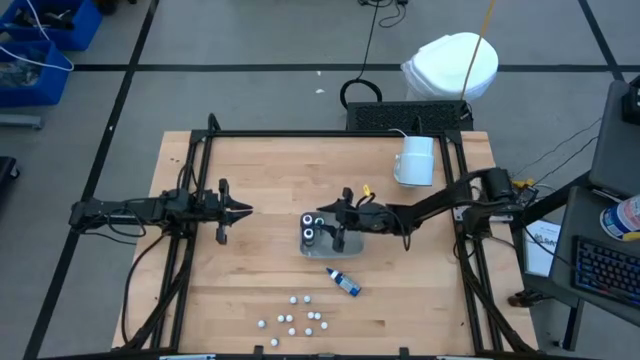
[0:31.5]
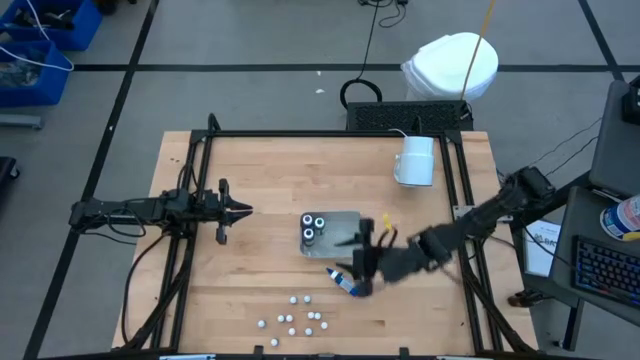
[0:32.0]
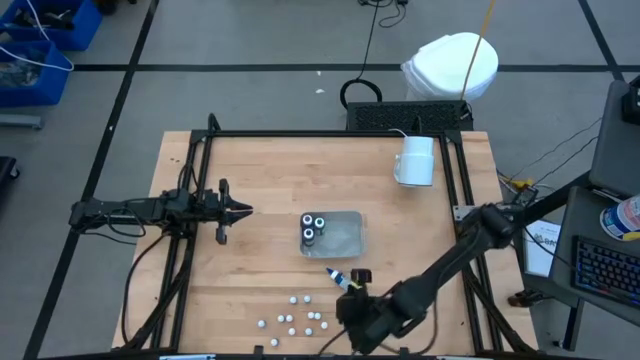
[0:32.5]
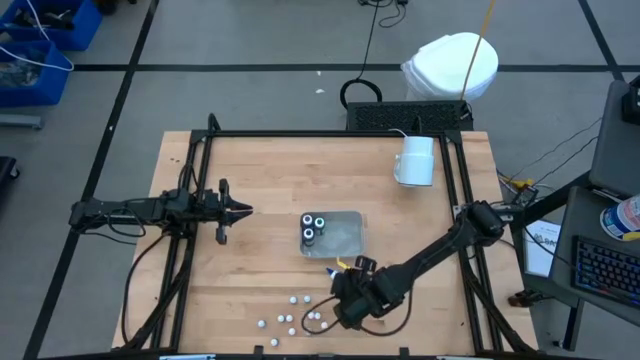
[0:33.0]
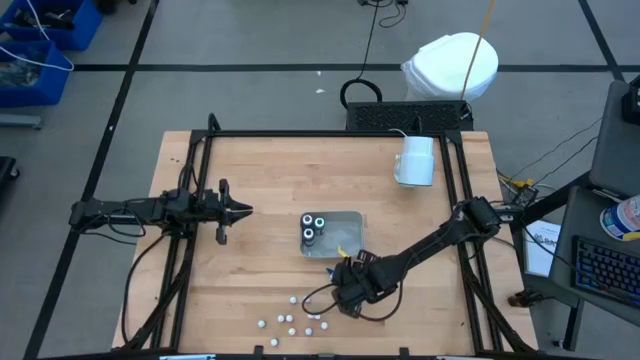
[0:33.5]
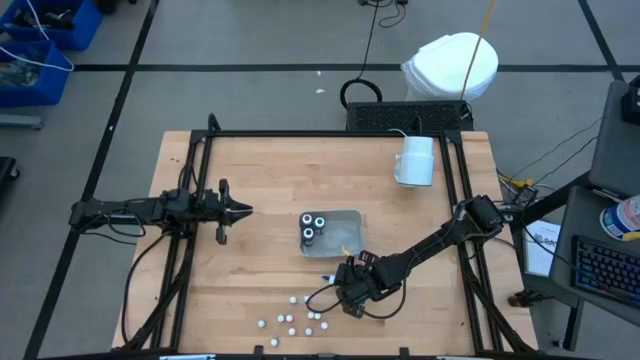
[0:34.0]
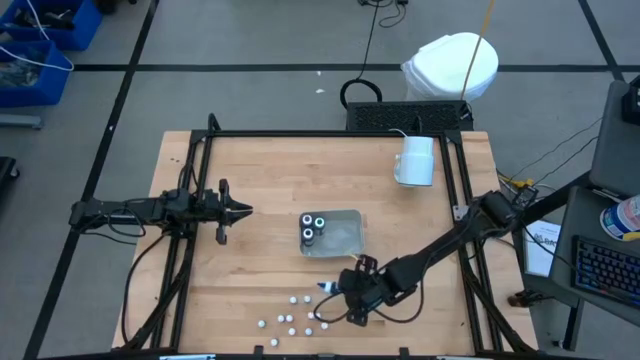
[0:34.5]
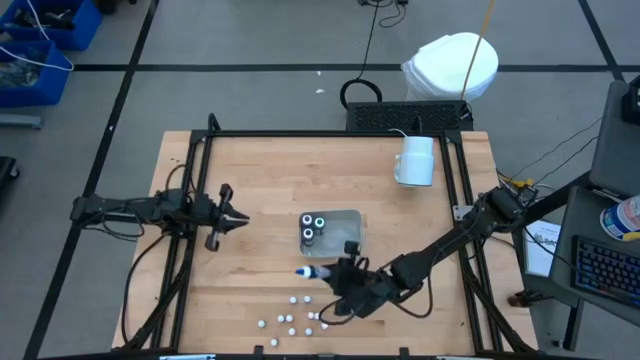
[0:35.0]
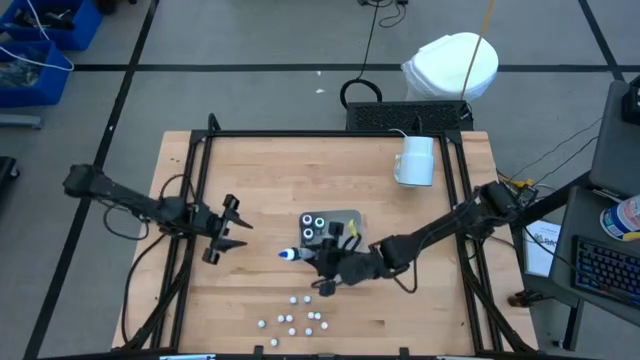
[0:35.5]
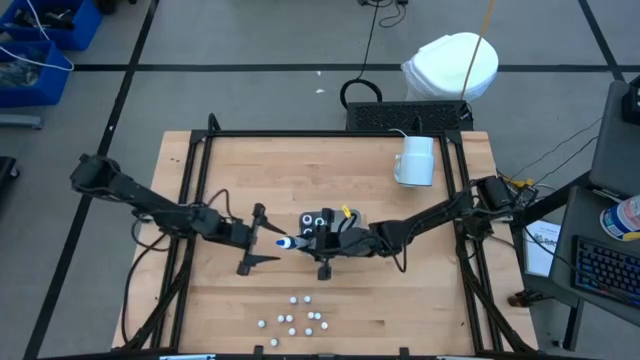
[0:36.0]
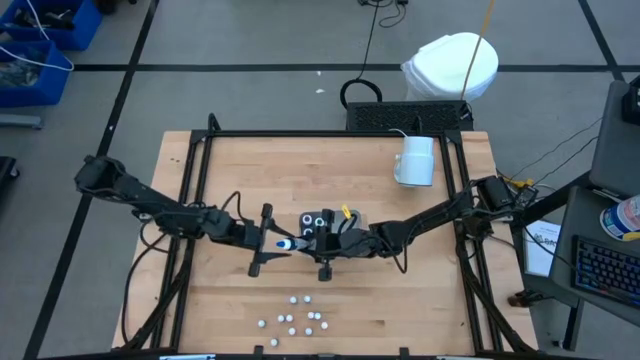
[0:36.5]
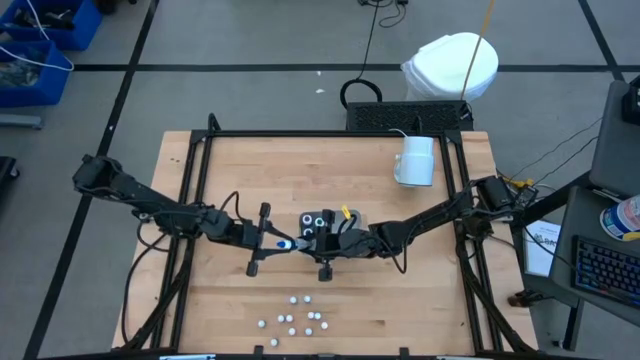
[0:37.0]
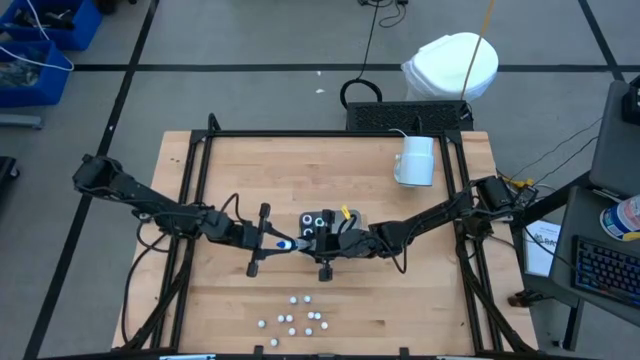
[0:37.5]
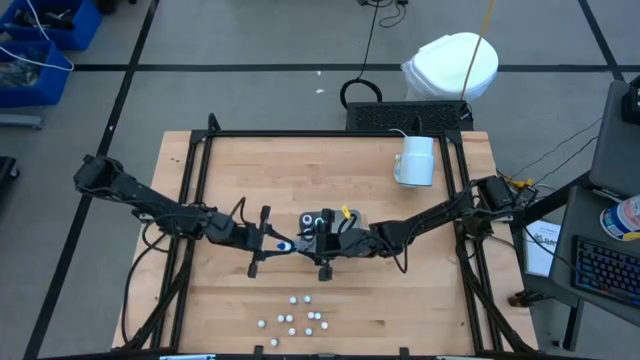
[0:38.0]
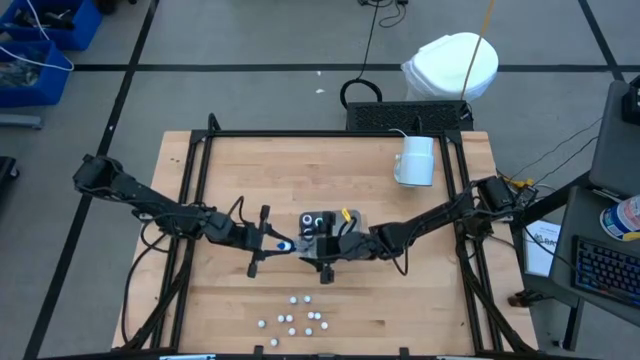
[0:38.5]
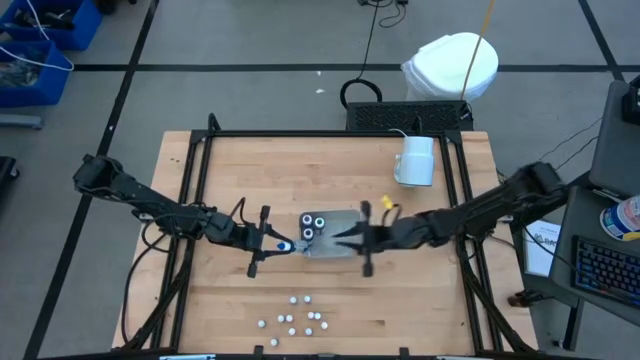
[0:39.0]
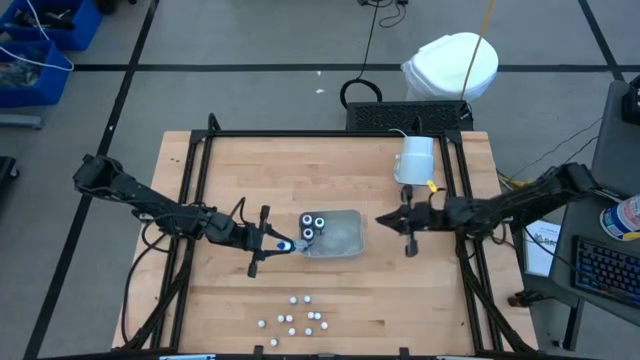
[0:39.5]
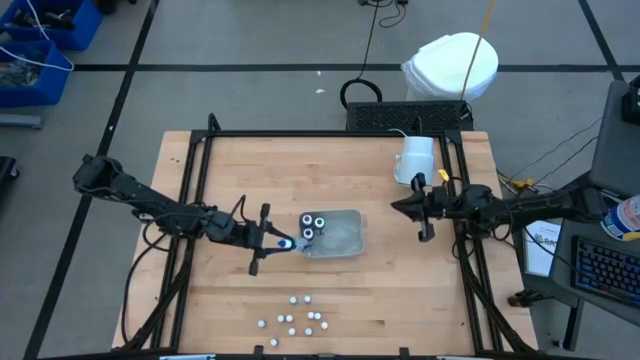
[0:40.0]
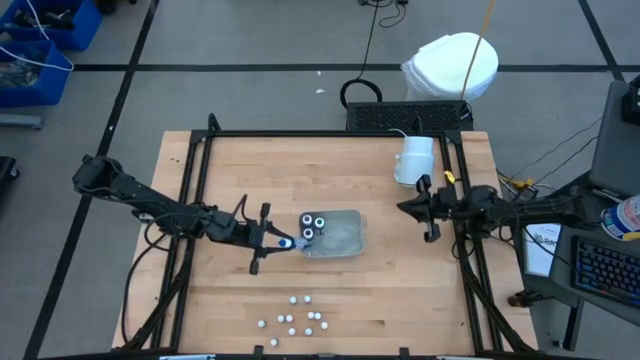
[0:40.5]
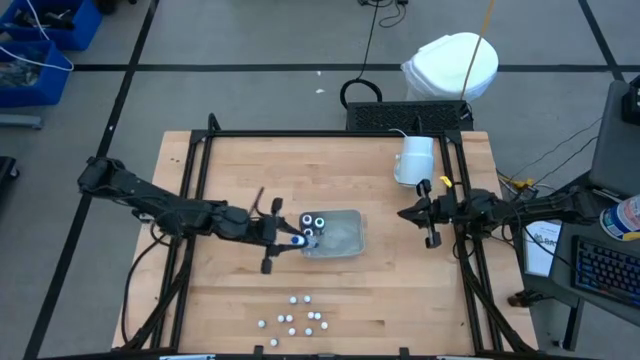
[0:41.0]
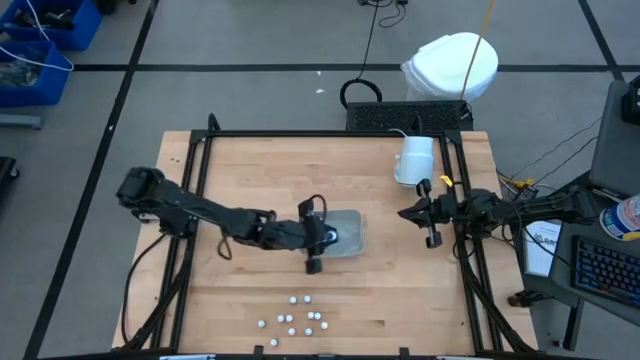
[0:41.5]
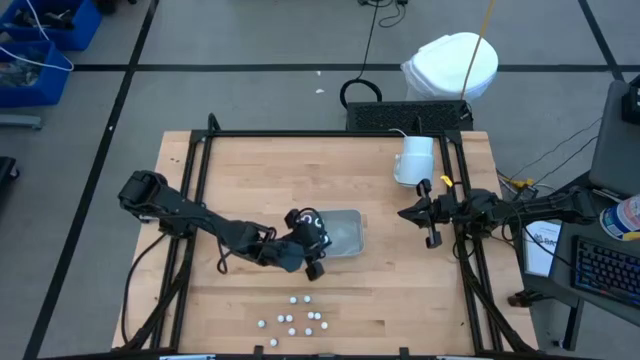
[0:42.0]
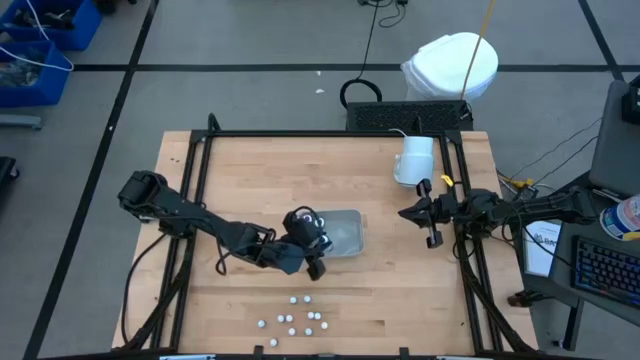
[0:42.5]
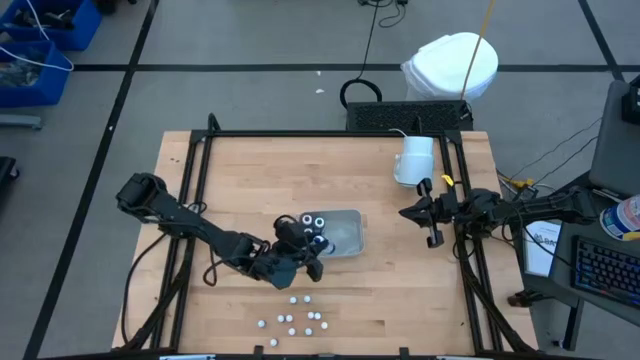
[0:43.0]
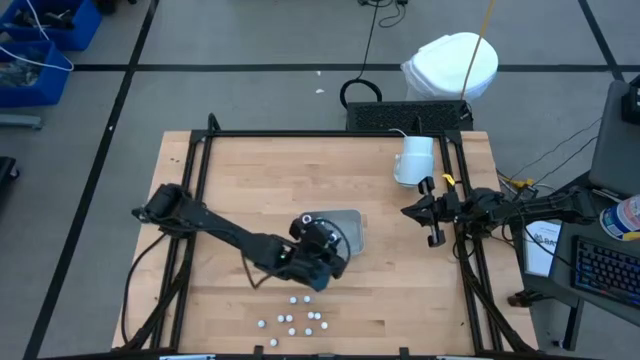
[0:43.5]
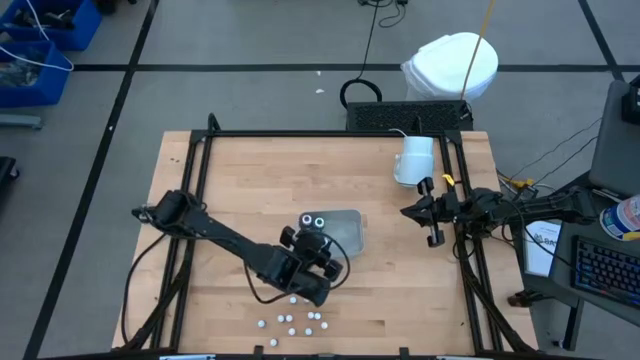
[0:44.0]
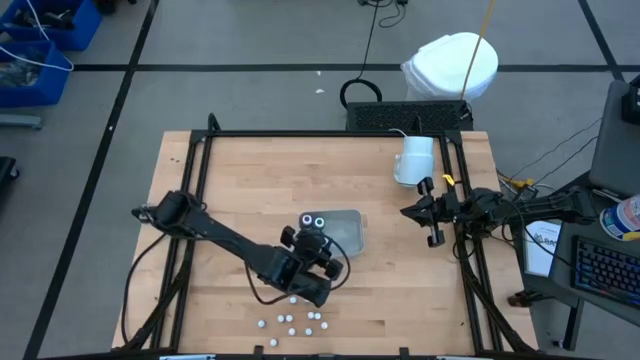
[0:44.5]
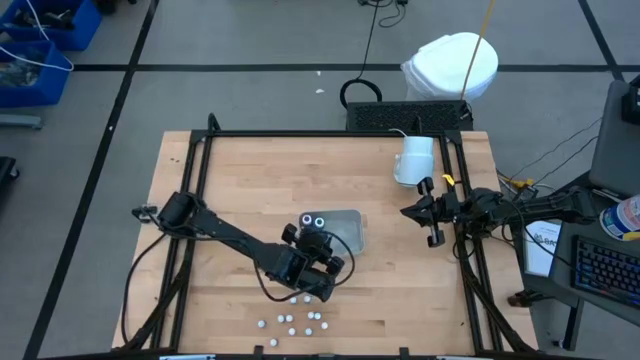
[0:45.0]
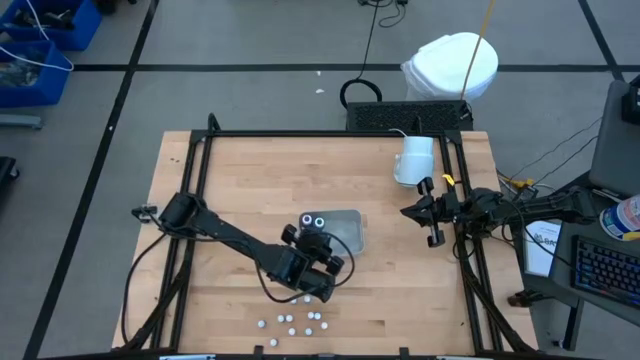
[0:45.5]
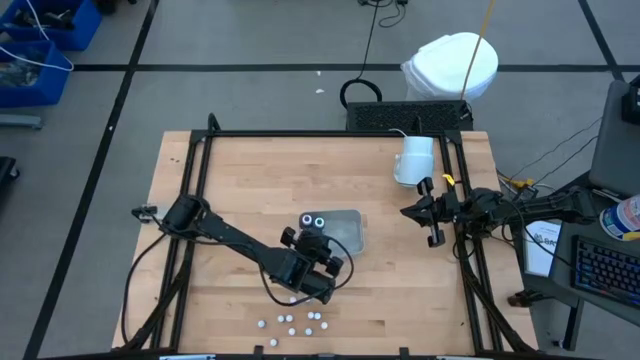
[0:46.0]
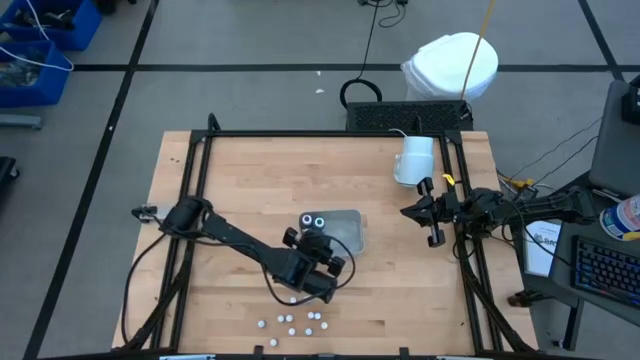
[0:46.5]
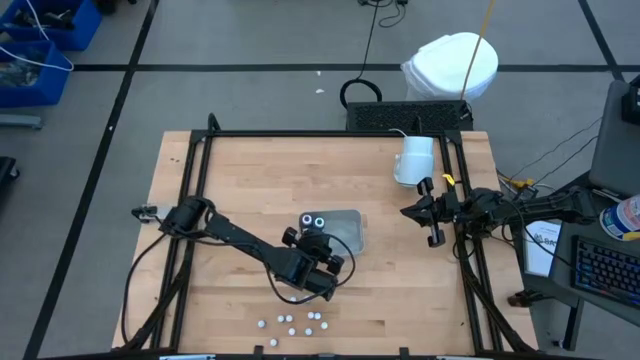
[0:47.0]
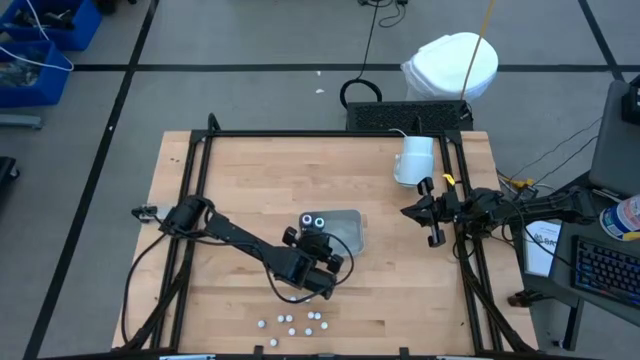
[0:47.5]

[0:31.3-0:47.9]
Task: Pick & Place food coloring
Put the big blue food coloring into the gray bin
